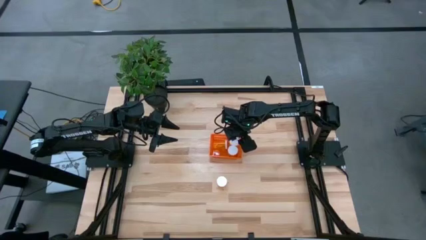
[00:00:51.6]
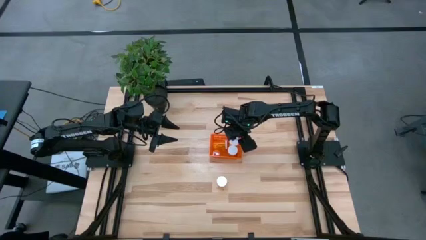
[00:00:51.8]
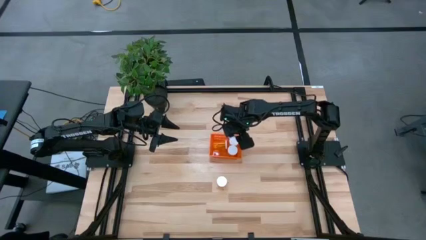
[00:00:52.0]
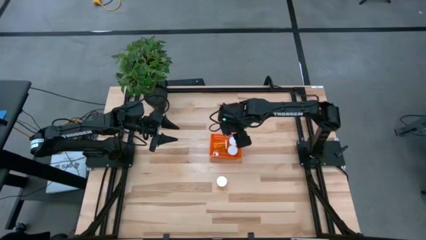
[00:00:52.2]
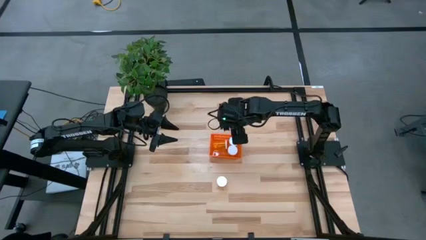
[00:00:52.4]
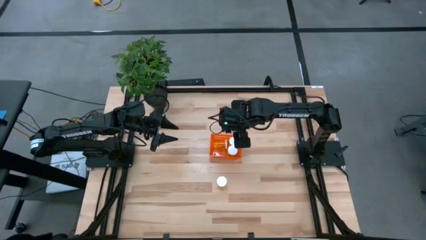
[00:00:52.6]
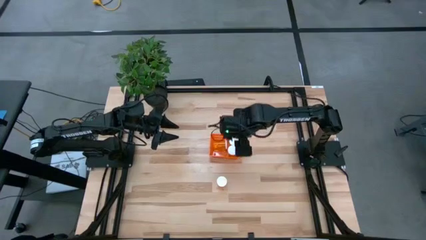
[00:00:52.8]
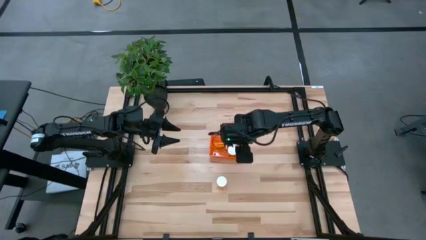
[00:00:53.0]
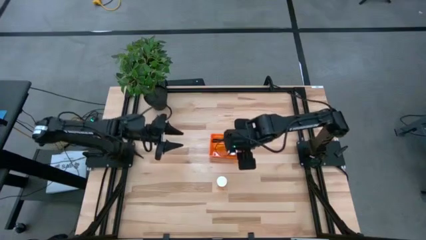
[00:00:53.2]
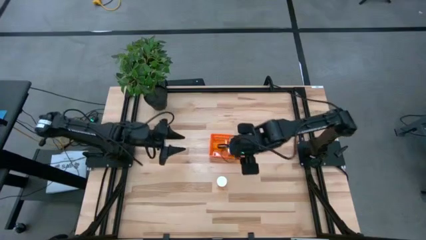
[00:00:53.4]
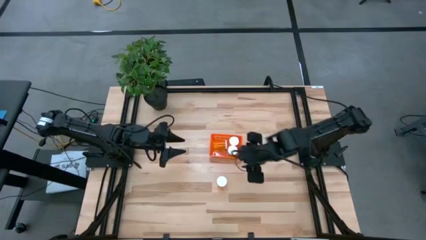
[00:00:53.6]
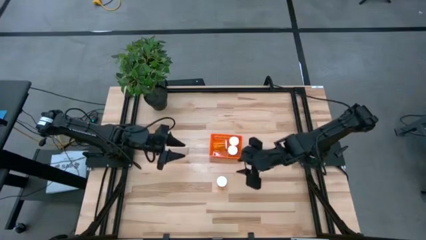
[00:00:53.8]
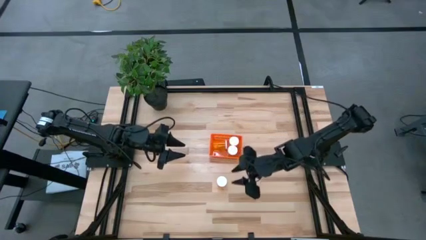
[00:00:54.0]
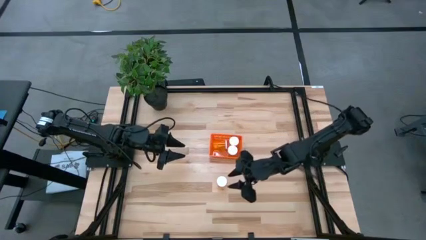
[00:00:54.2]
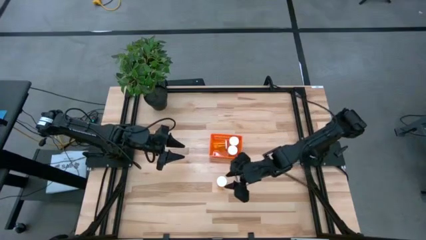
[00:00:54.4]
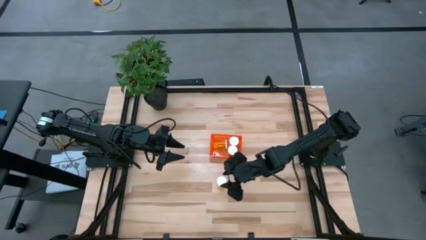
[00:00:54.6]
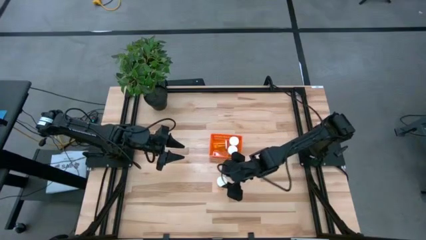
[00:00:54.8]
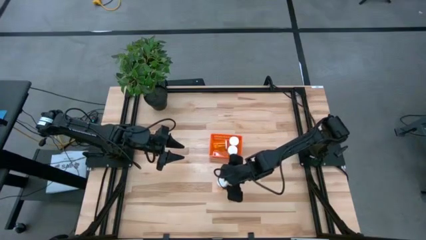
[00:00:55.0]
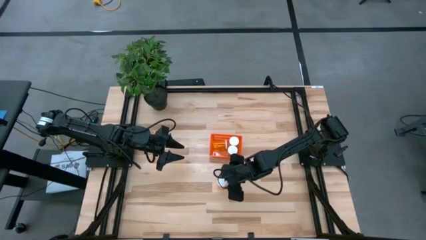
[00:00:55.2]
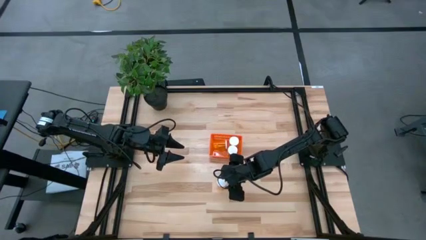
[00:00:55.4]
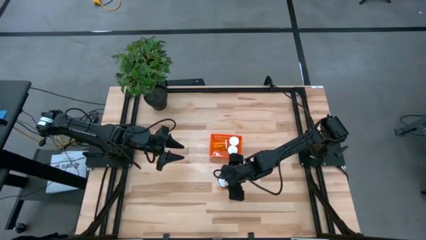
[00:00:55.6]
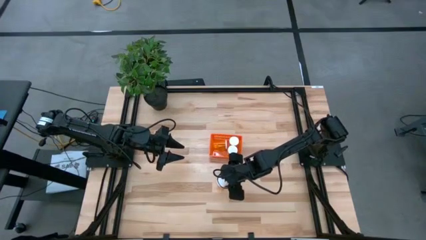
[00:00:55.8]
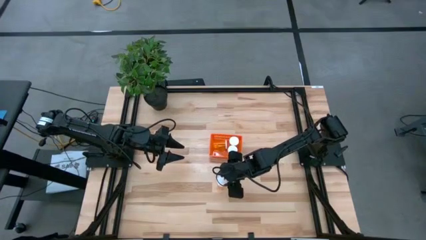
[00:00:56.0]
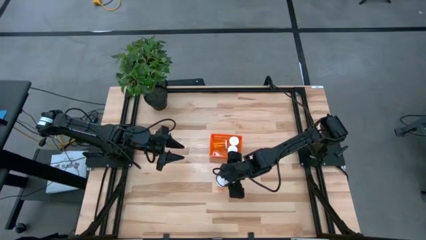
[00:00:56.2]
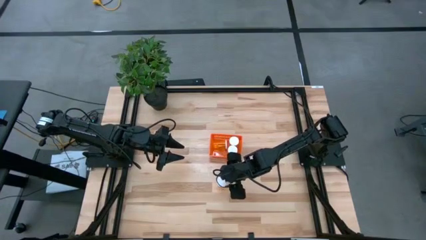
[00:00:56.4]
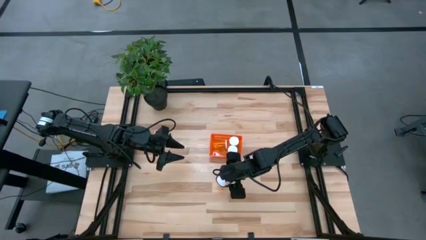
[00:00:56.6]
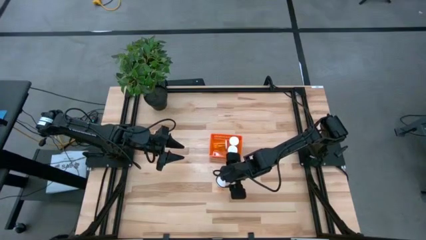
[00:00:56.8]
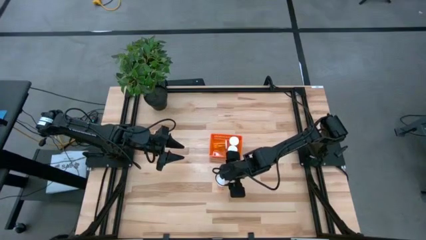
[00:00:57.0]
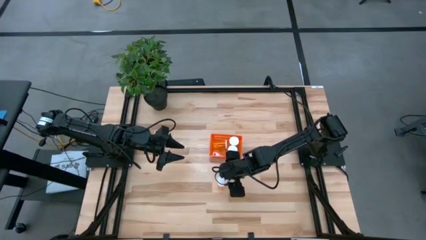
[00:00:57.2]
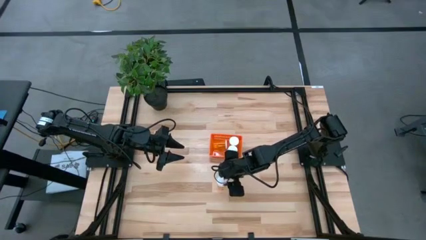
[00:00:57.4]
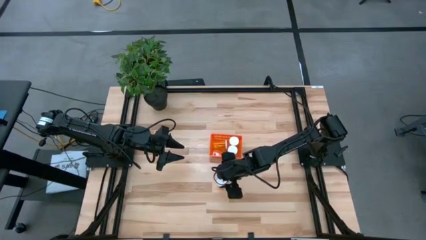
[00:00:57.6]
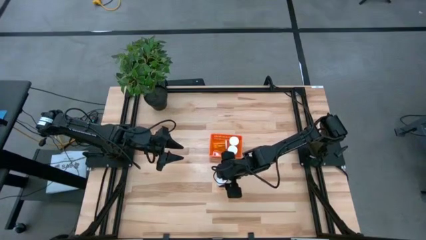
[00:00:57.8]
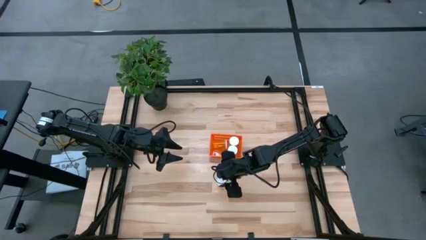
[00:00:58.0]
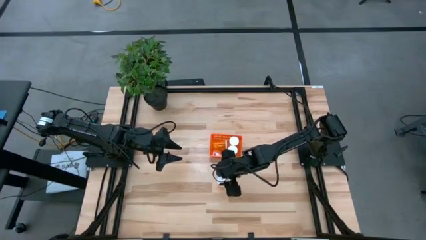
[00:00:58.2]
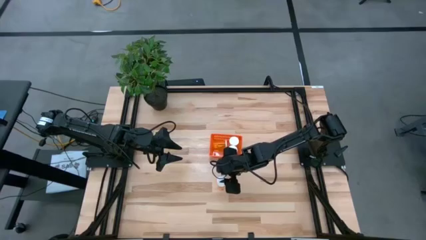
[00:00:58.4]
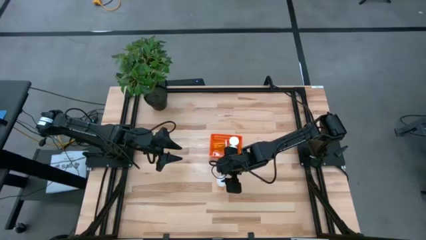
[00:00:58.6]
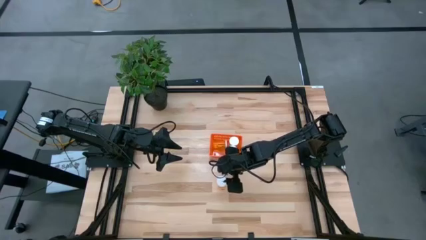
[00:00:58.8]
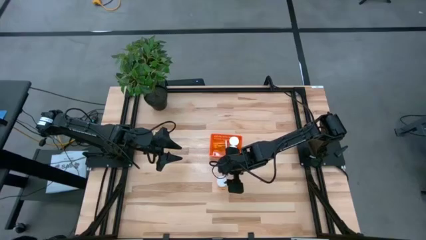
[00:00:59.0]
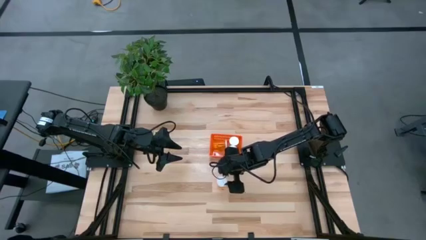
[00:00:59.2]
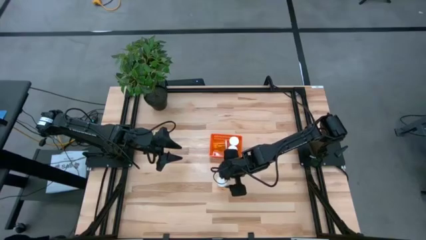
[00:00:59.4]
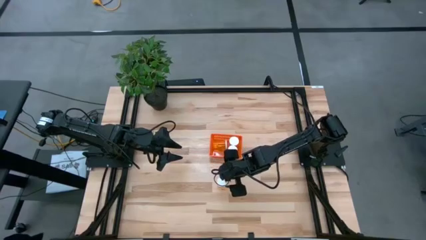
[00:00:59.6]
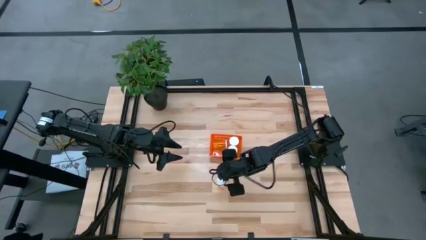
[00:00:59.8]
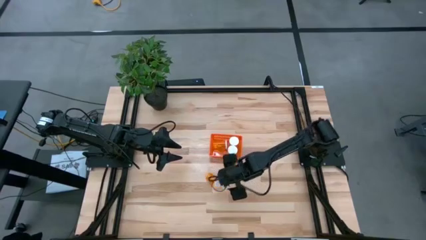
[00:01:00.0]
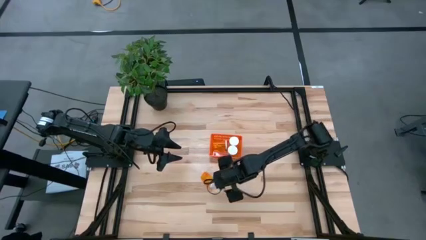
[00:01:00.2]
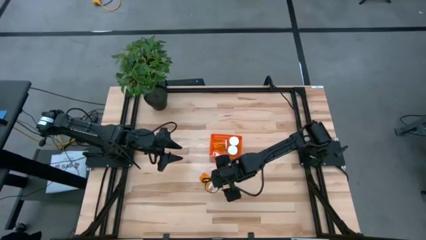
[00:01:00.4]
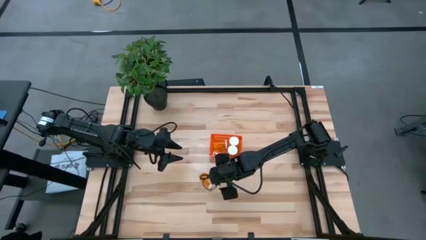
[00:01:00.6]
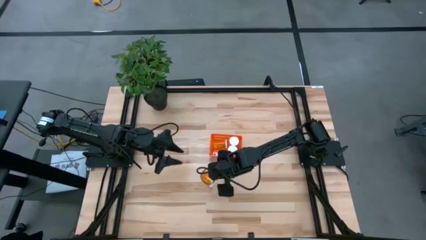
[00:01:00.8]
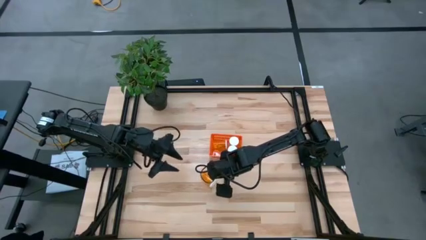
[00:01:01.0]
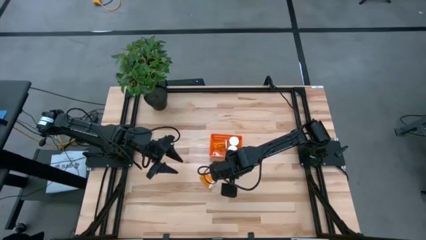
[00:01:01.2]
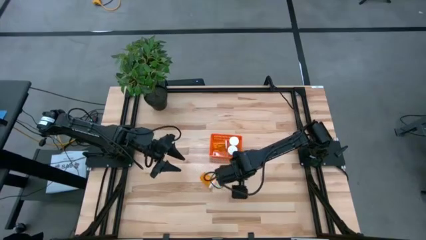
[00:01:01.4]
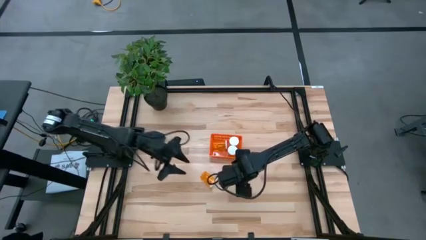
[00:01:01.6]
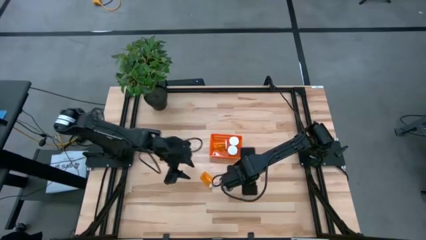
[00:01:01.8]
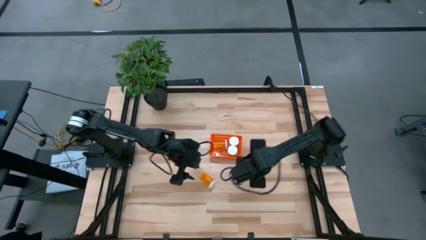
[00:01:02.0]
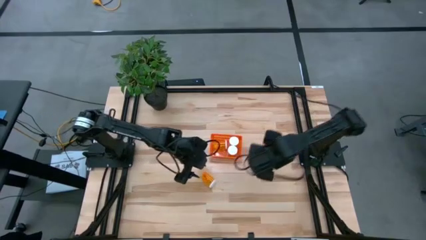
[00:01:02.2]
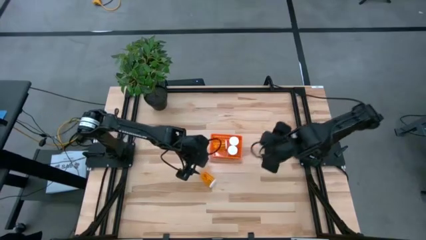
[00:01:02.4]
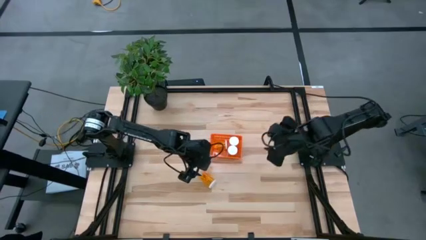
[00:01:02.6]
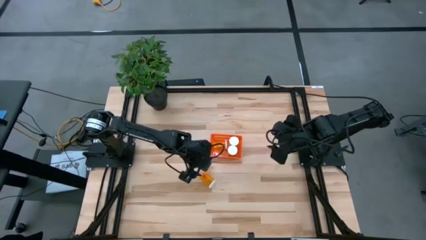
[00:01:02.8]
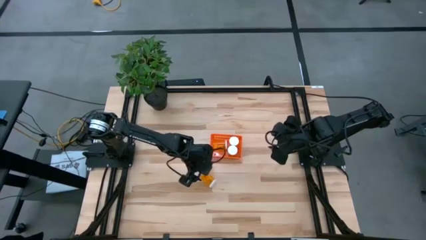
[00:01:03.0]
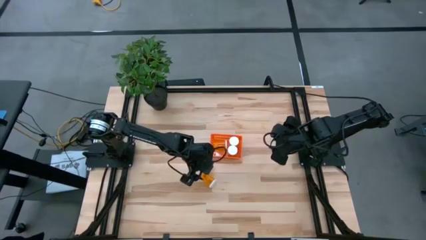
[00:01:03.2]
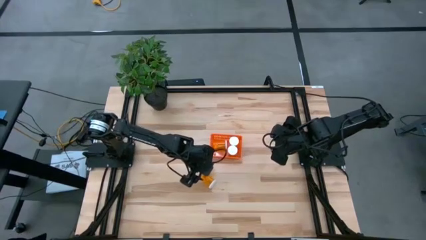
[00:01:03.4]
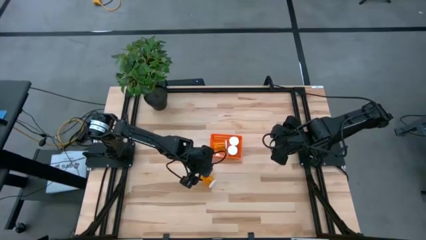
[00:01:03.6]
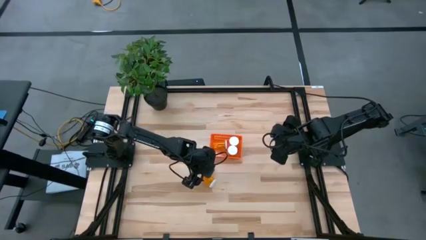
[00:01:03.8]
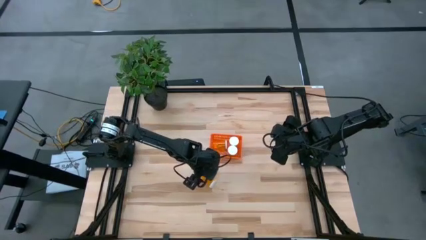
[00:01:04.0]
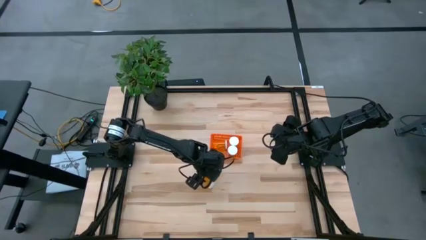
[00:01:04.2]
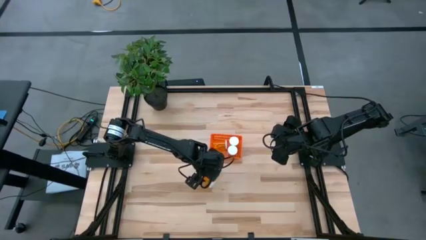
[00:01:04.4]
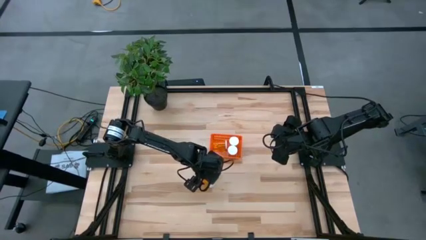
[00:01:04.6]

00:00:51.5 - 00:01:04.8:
Task: Pick and place pill bottles into a basket
Put the orange medicine bottle into the orange basket
